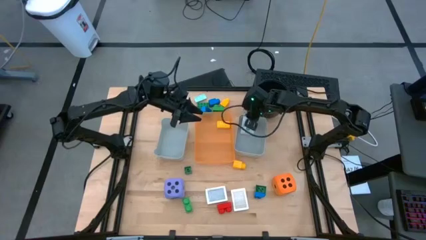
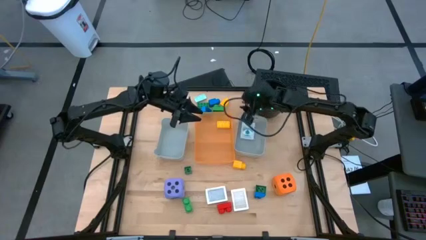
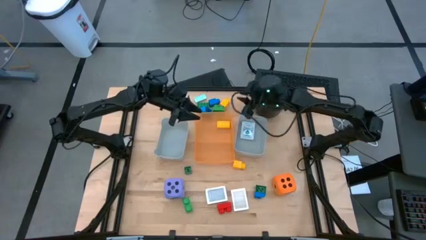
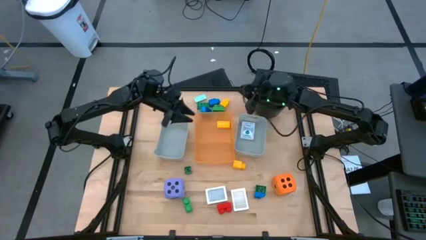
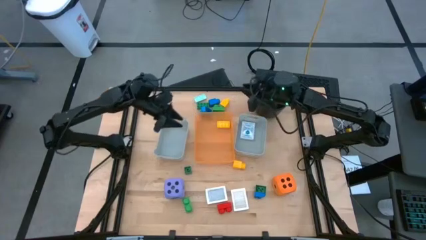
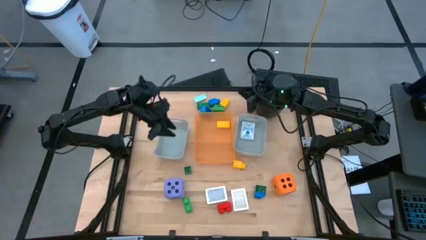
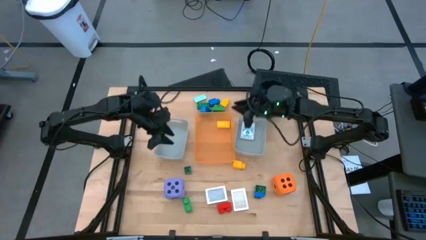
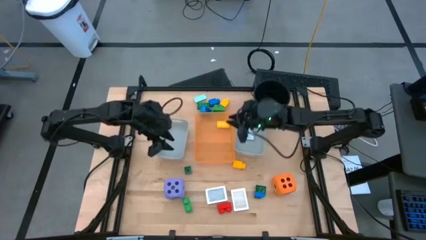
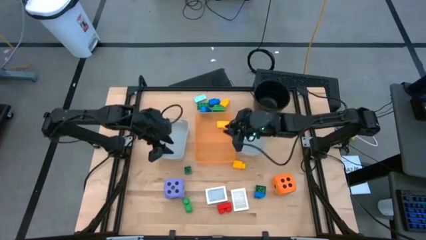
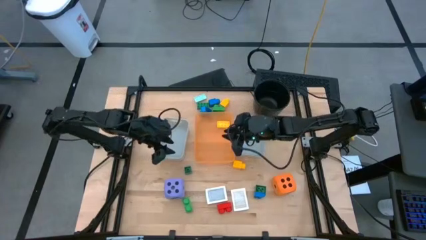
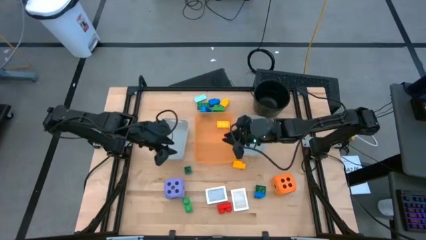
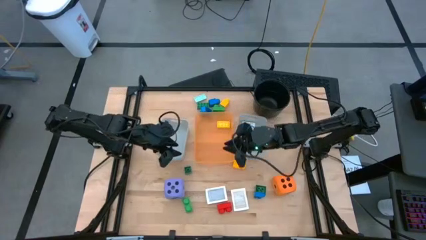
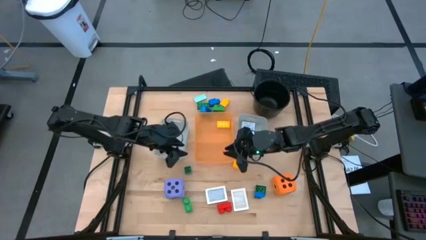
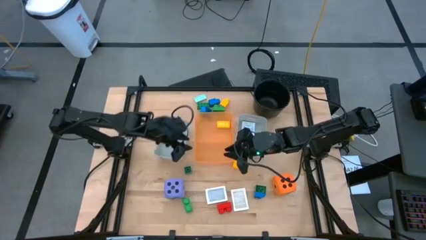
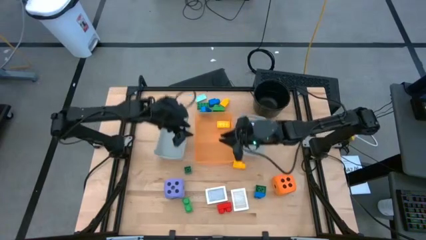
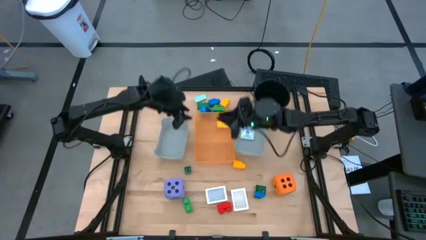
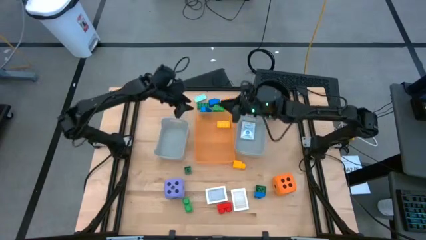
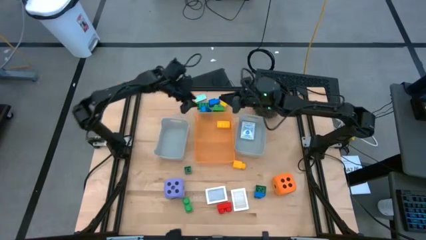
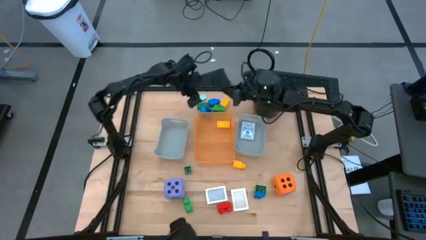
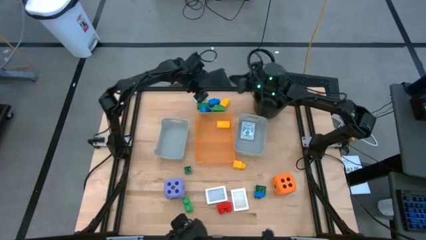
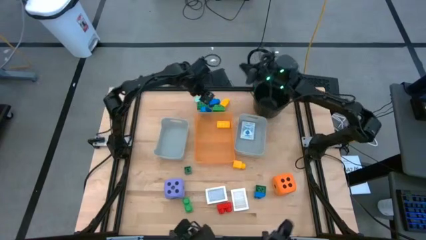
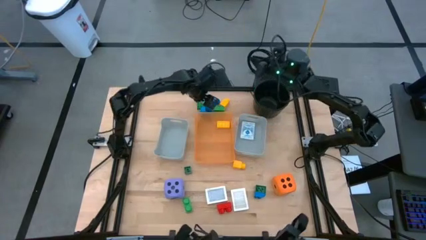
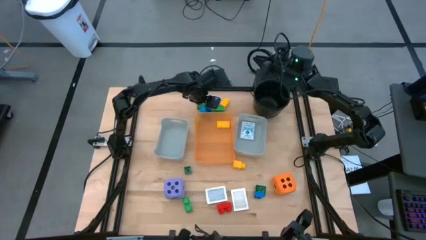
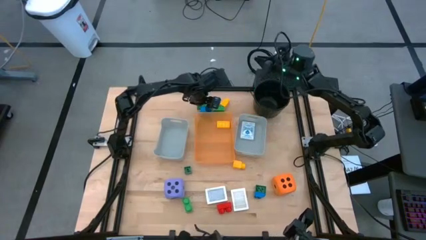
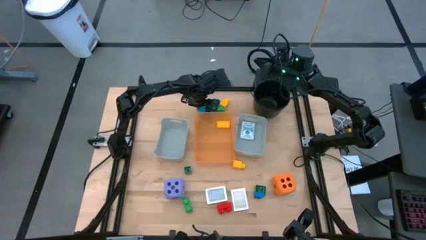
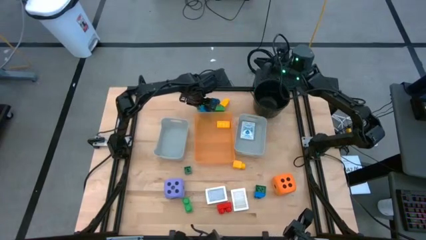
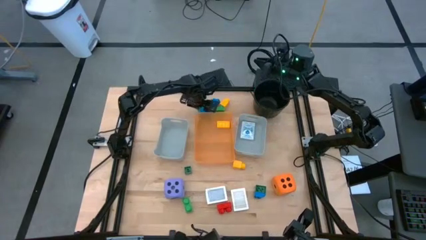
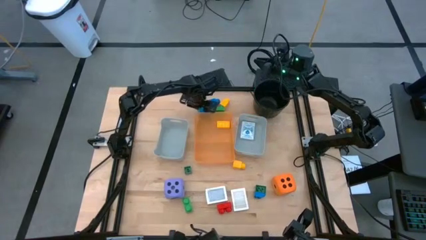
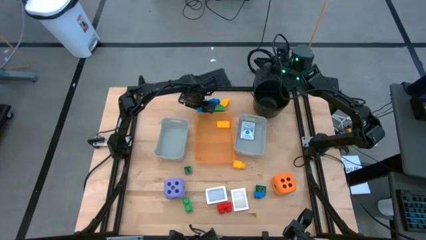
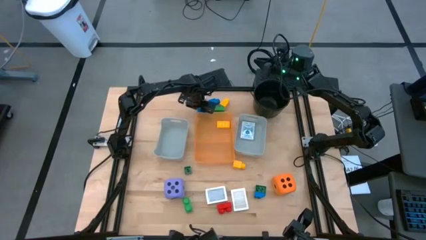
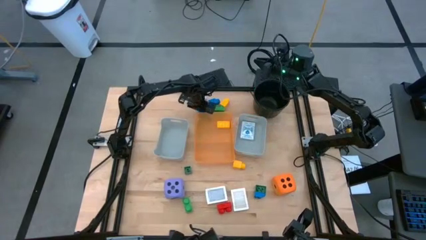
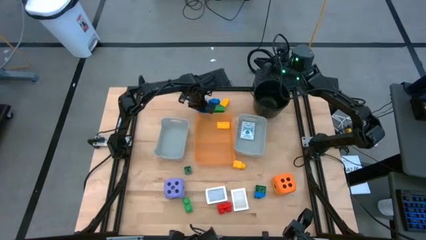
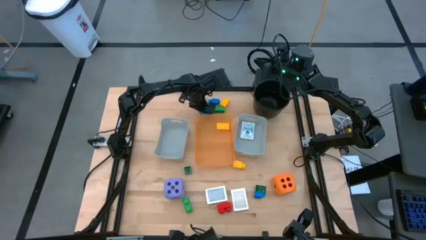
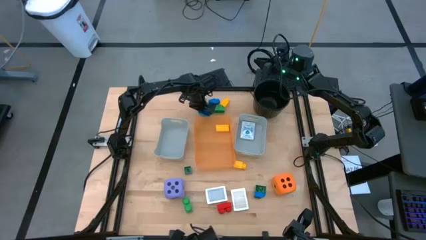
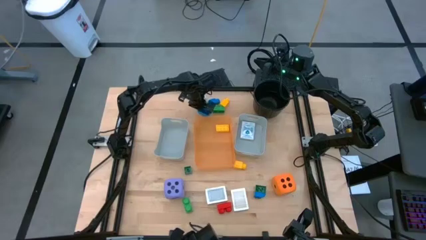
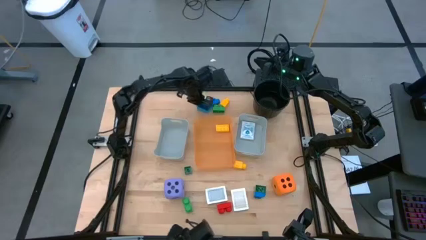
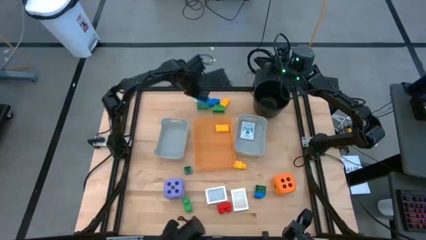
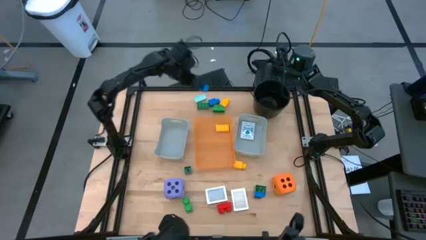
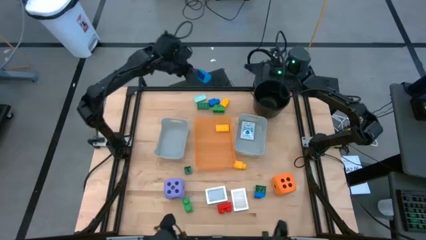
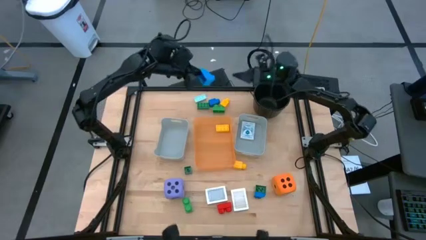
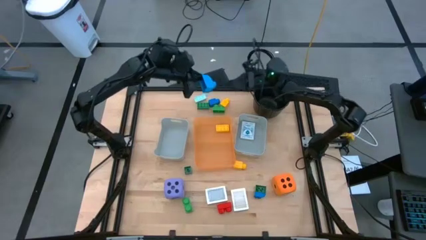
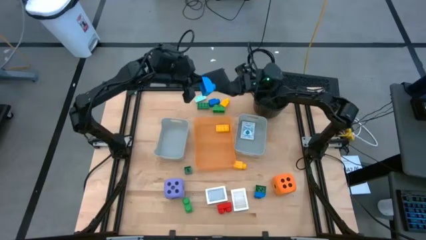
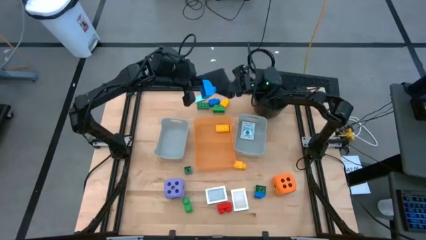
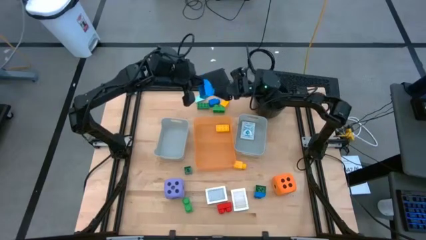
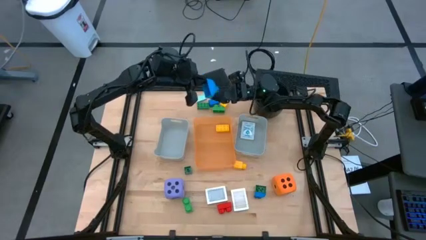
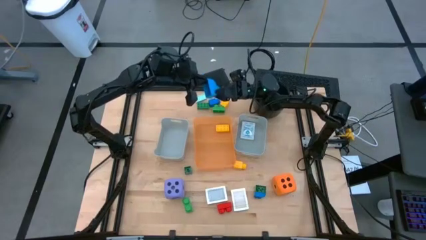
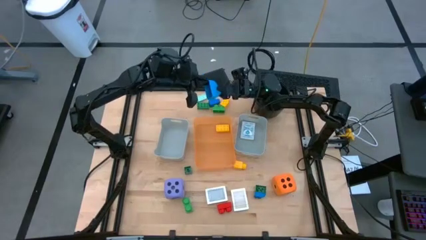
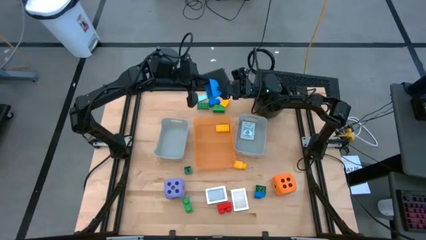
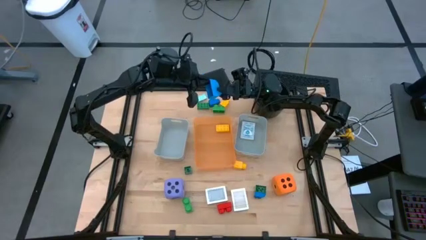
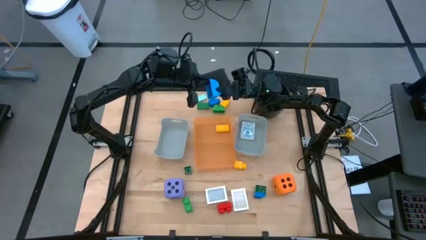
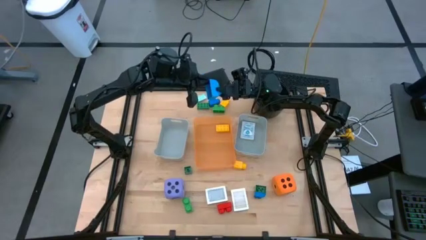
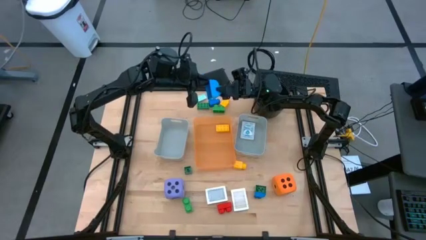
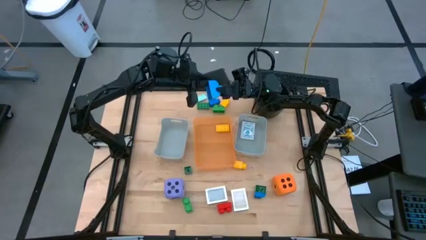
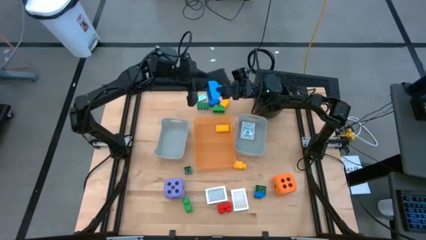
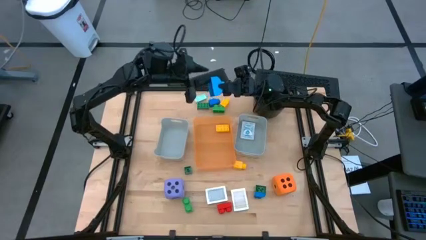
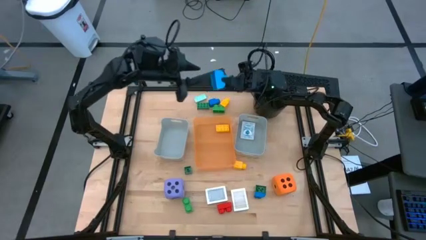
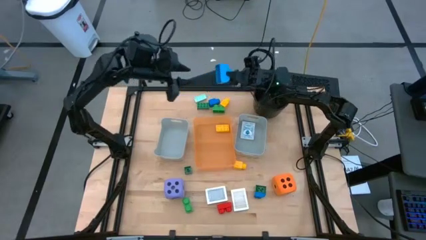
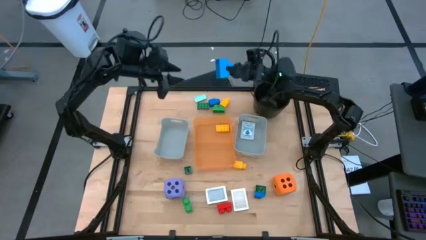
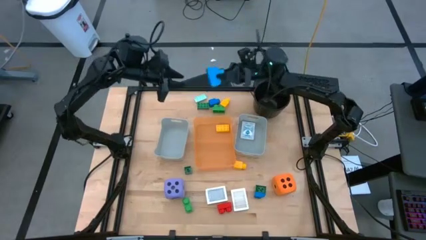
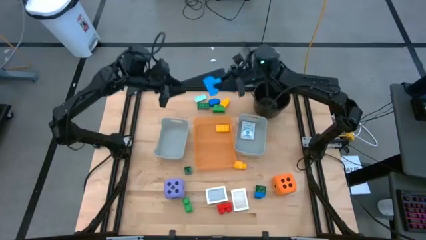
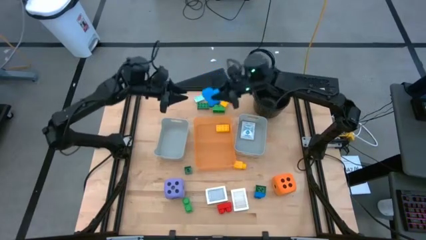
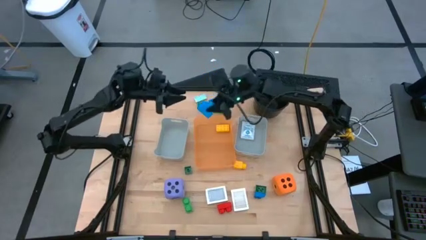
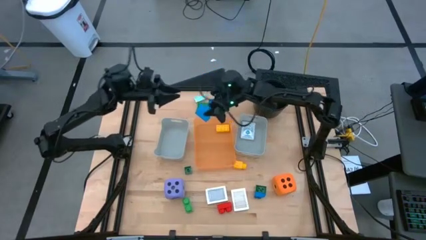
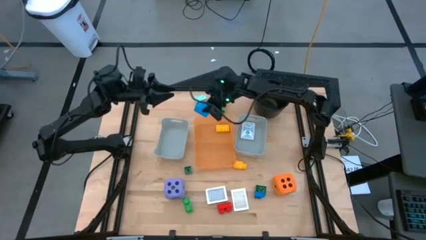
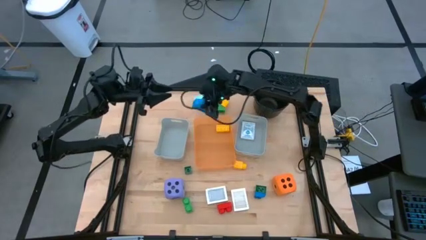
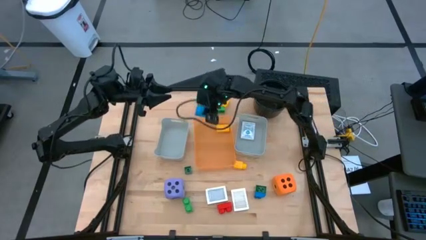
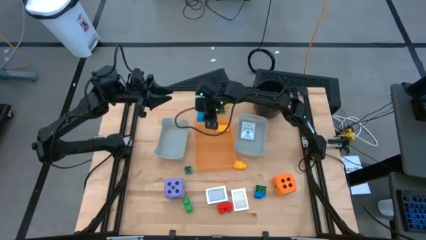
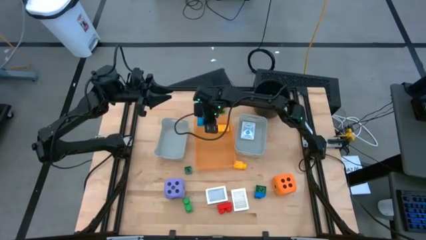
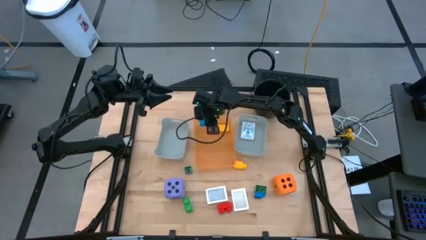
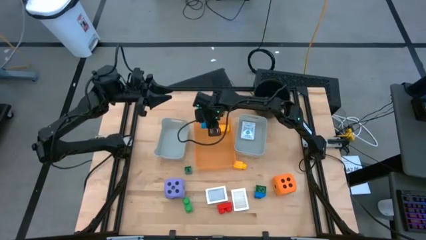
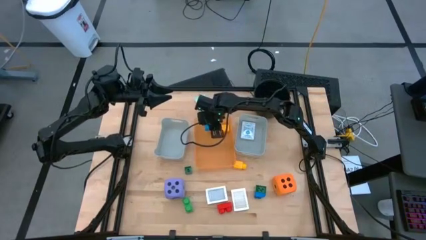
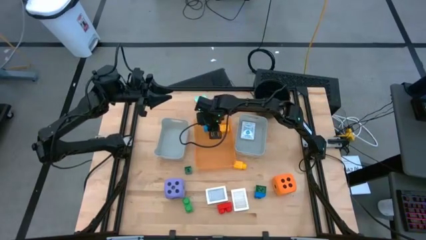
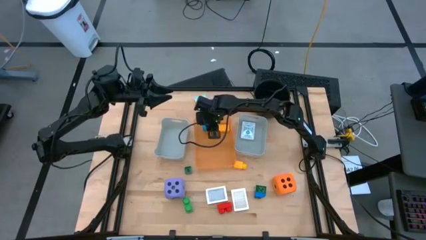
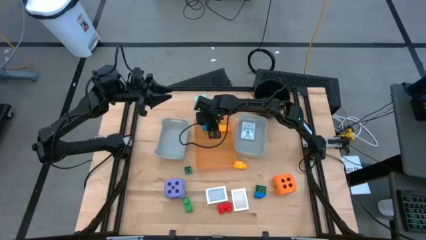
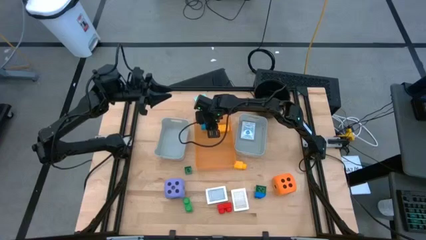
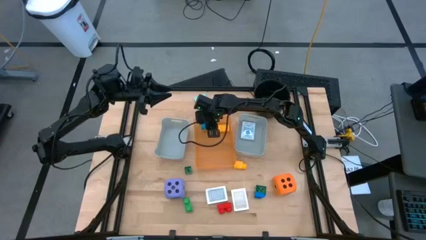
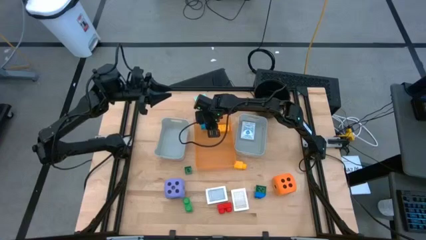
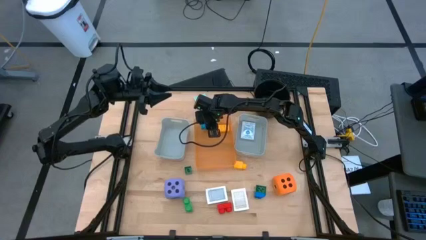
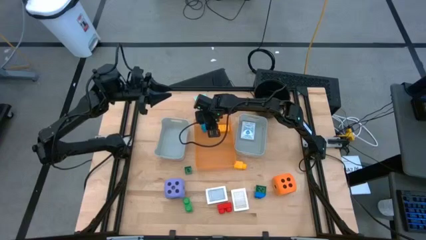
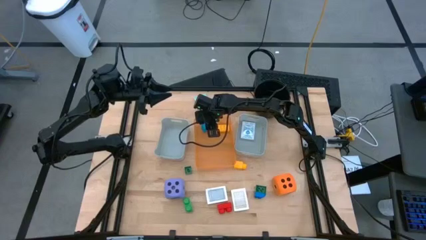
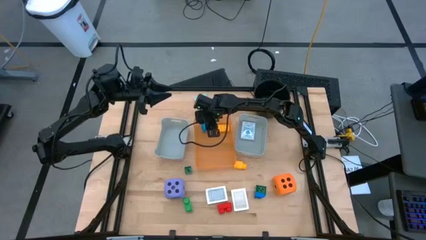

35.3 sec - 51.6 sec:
Task: Pick & Place Toys
Put the blue game piece into the orange bin
